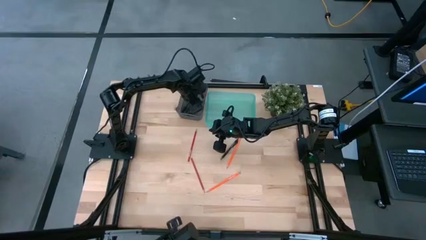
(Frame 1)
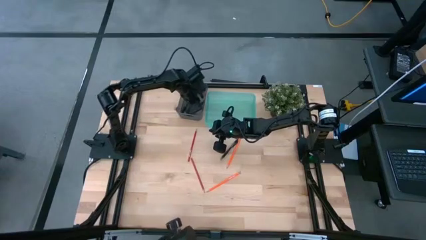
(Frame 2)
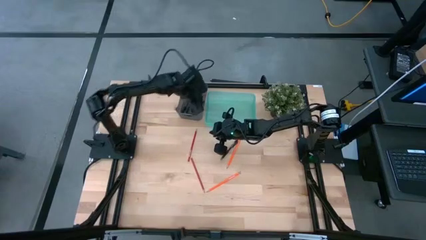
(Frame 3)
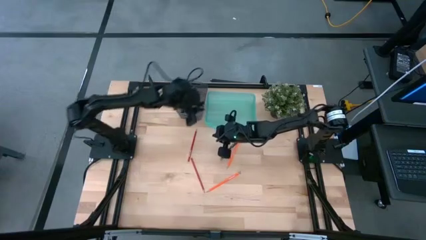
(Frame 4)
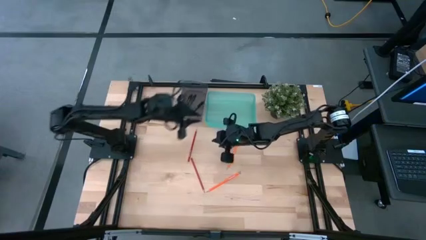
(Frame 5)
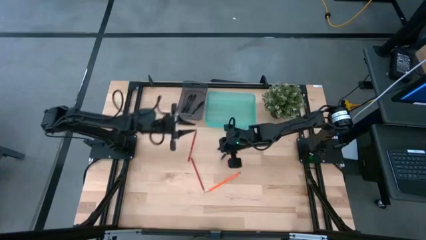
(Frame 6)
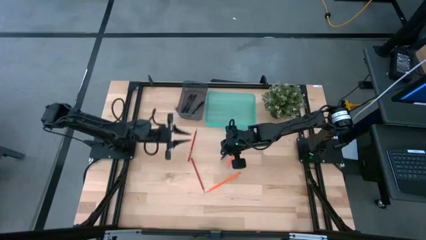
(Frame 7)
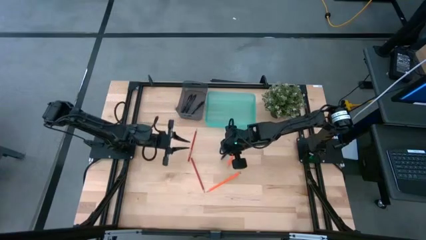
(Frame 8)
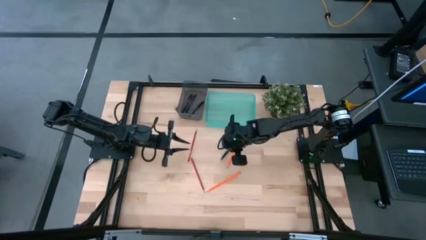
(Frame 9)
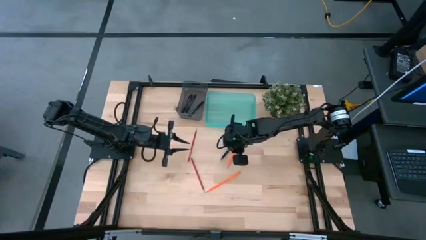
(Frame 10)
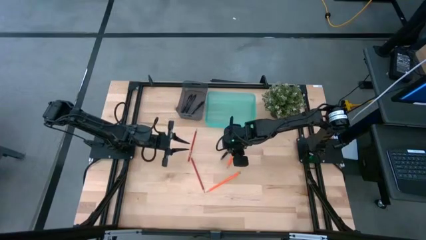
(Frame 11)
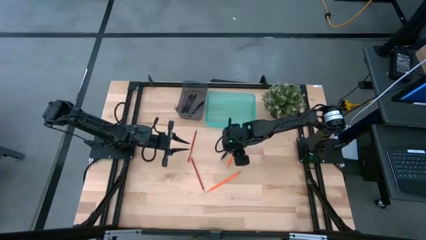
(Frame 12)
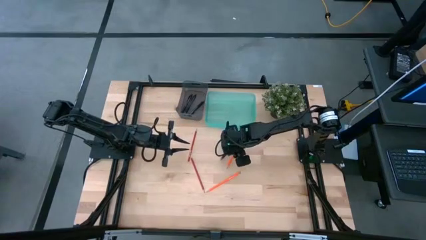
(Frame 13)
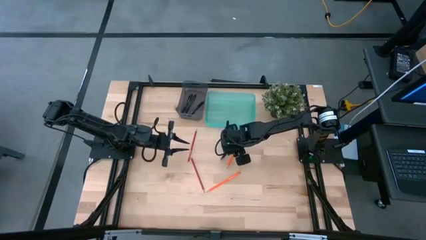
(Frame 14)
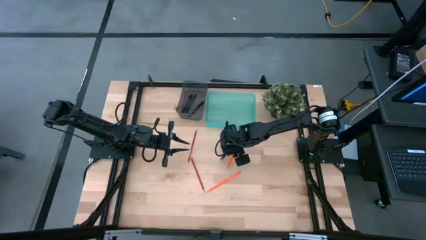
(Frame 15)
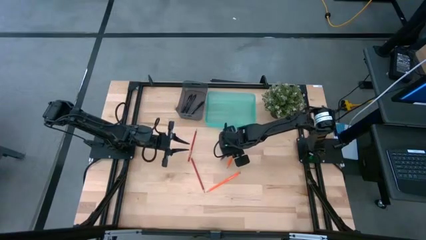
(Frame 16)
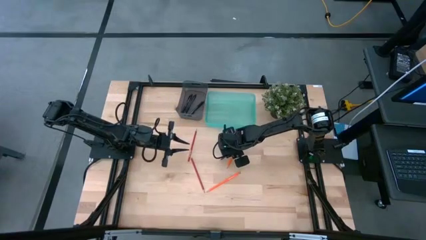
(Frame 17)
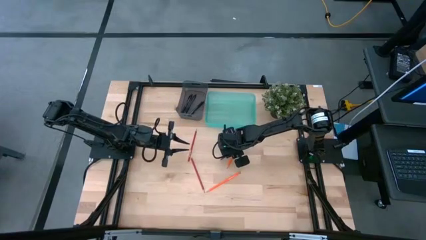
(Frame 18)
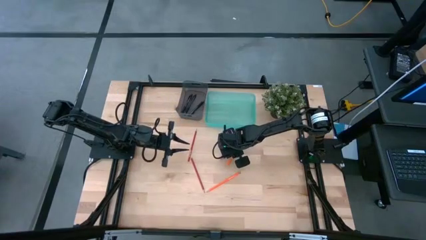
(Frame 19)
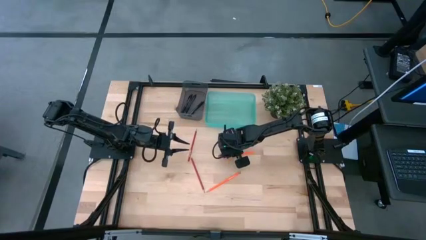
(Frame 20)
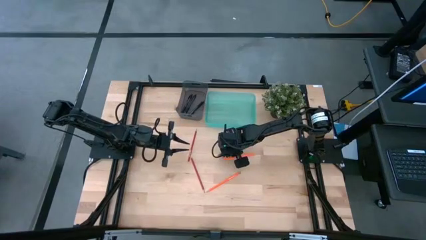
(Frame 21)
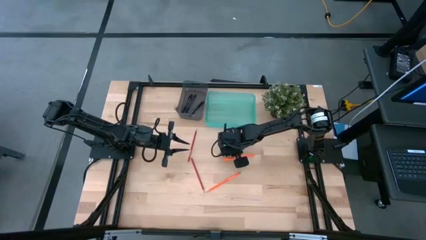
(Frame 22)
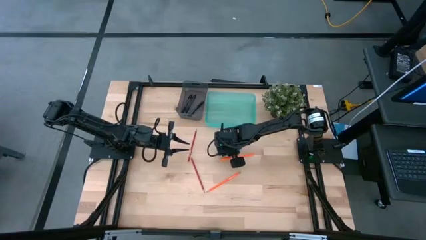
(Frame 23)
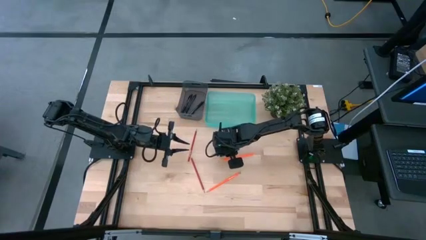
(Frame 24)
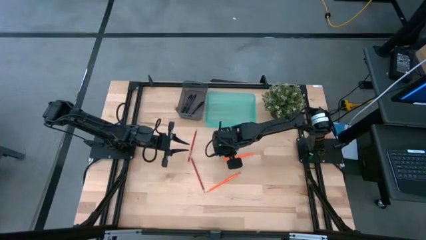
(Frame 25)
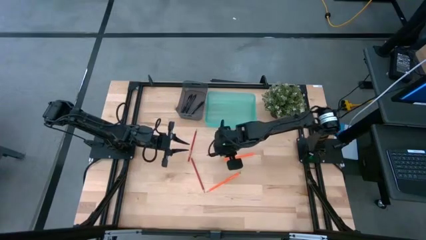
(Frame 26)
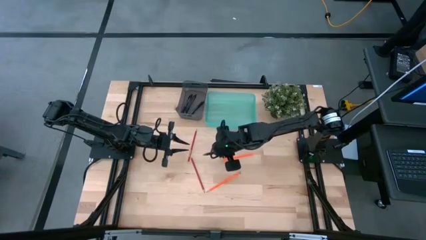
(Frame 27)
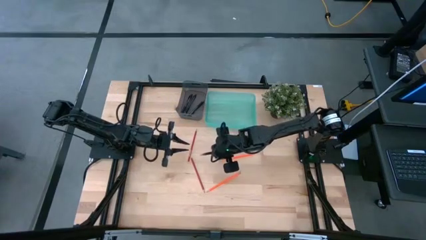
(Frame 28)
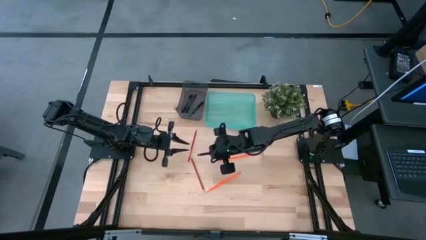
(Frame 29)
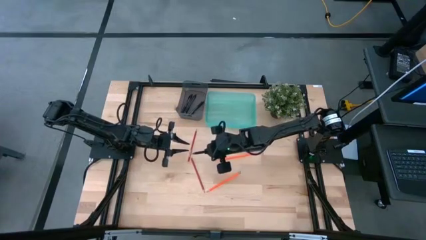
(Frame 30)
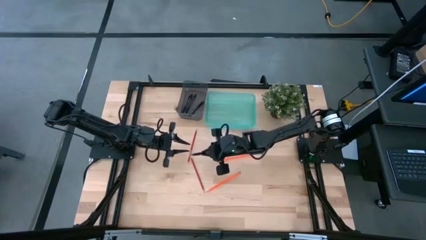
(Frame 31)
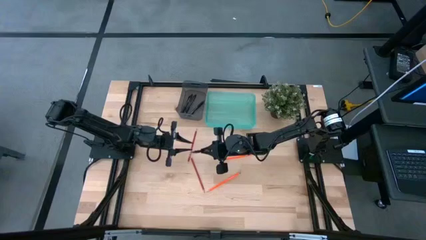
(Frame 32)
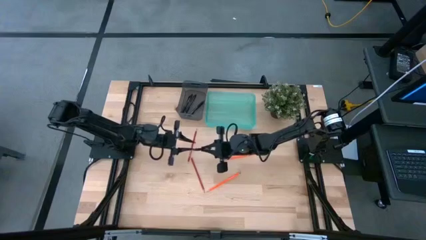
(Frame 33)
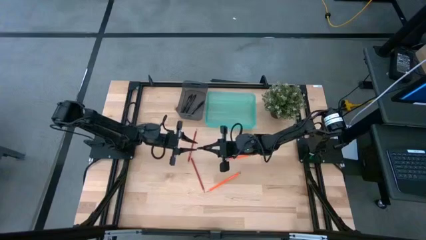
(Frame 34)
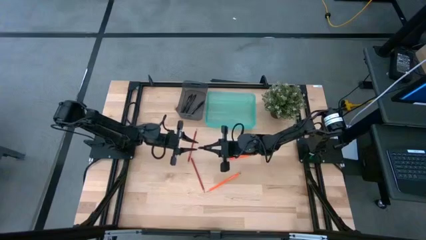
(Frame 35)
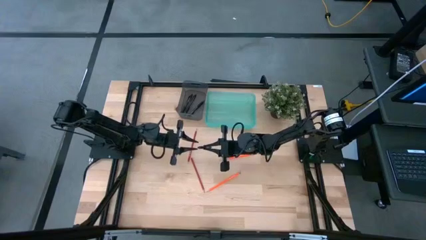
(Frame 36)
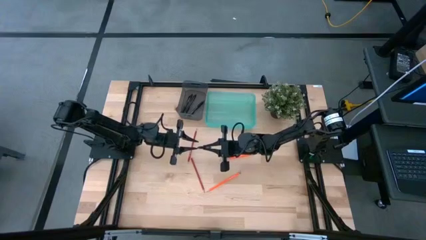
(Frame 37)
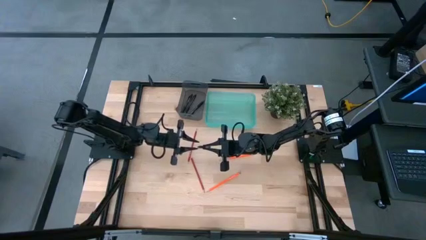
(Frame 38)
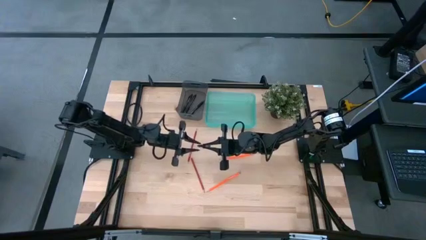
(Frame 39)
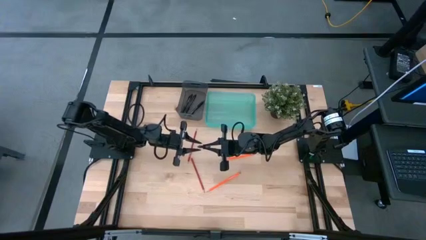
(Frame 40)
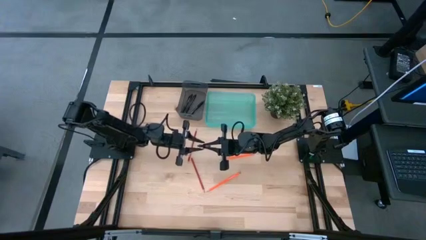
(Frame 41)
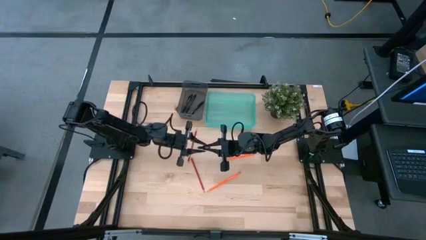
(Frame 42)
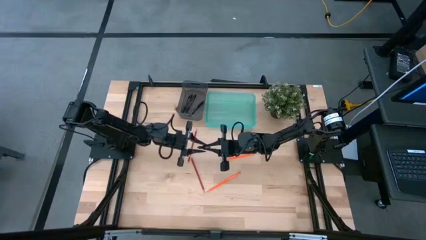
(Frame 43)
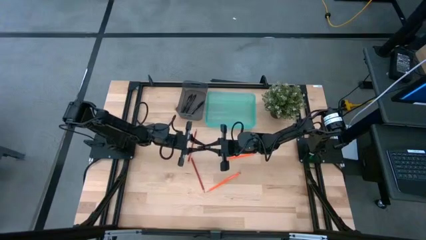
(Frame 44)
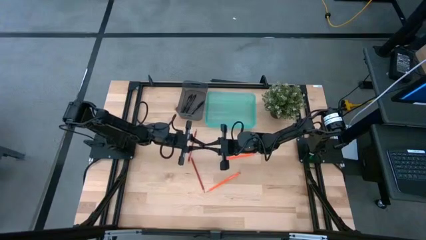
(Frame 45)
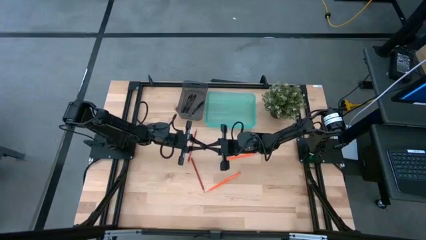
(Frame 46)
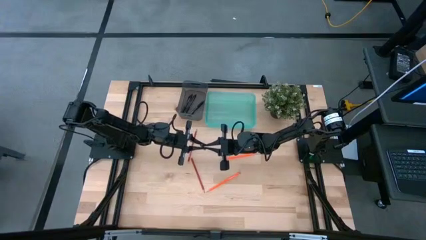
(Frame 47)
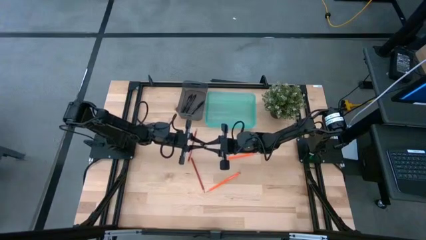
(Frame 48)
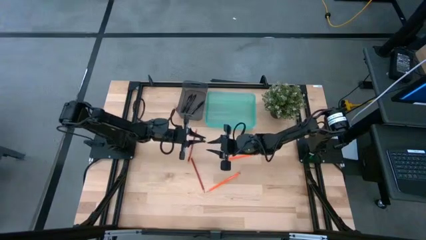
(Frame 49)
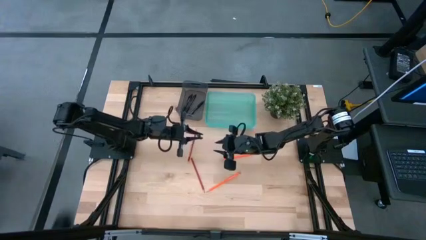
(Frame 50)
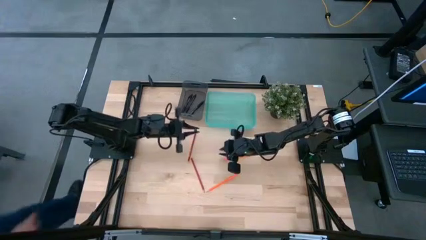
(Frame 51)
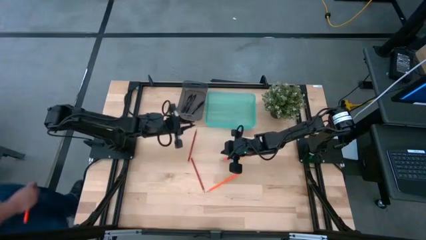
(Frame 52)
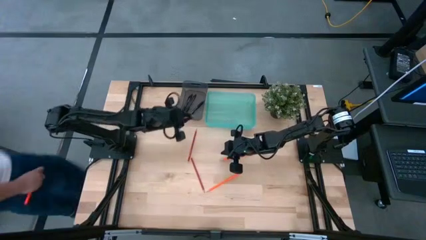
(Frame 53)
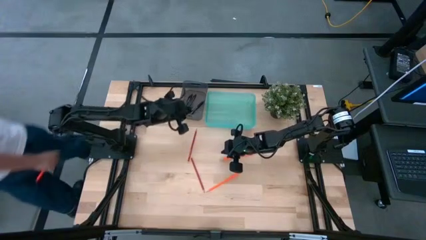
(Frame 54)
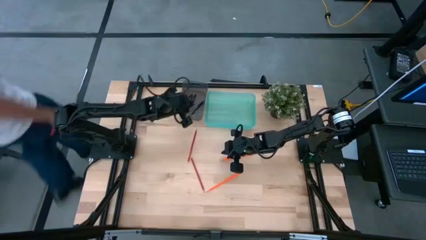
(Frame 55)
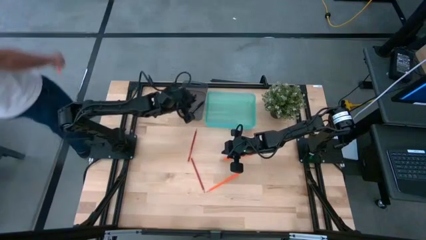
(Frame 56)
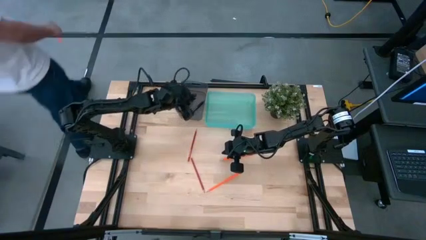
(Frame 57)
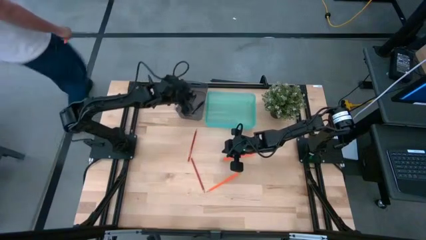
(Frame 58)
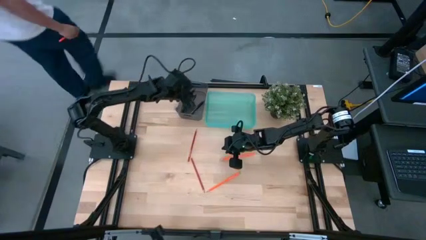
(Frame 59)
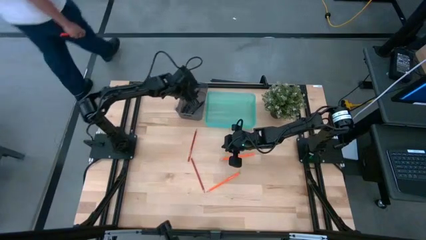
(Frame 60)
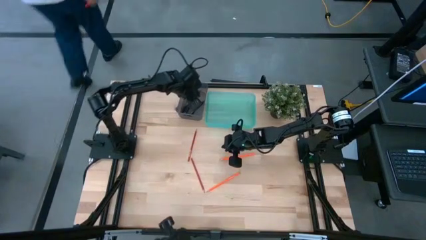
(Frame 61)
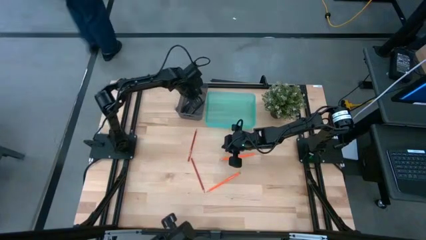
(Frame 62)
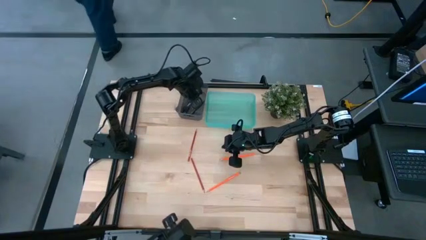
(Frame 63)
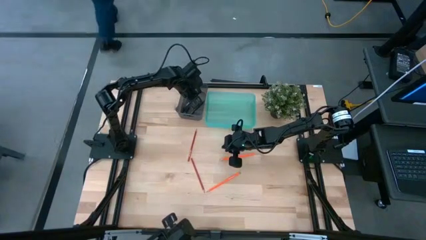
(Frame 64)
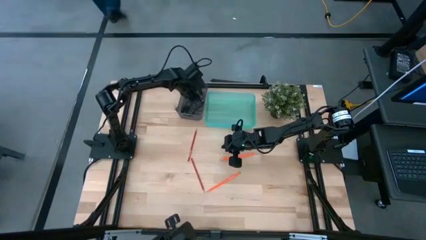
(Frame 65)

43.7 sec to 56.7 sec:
Task: Sort pens & pencils
Put the black pen into the black bin

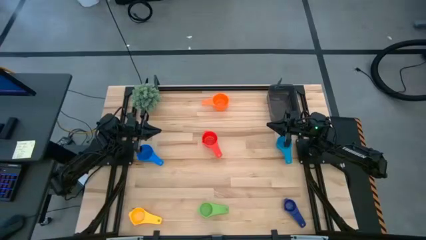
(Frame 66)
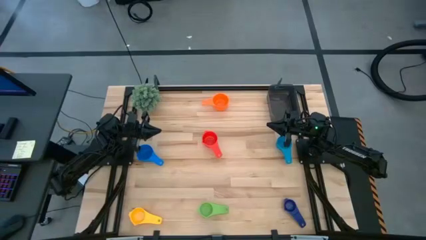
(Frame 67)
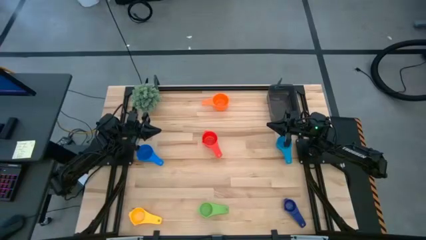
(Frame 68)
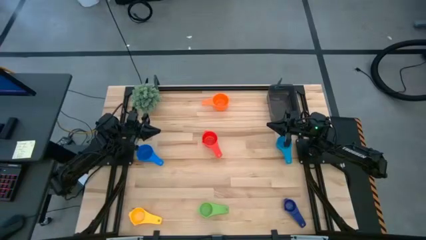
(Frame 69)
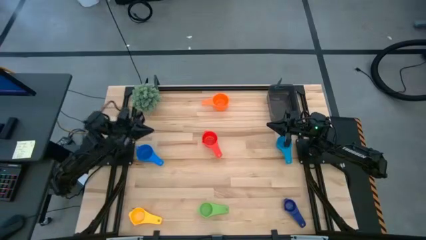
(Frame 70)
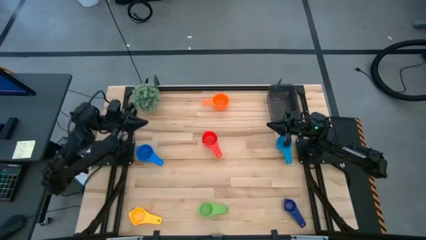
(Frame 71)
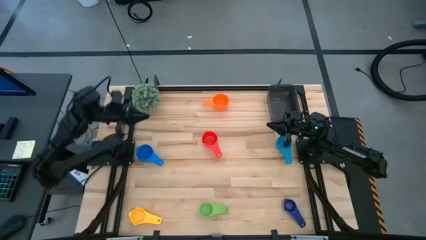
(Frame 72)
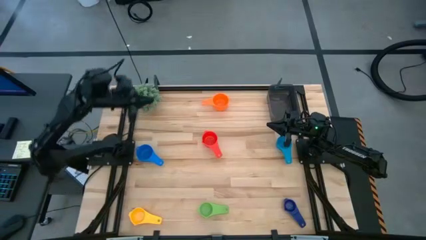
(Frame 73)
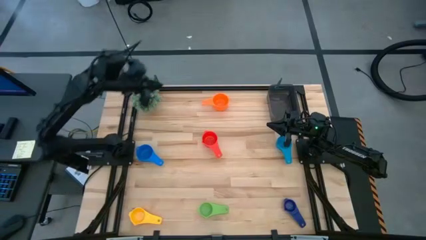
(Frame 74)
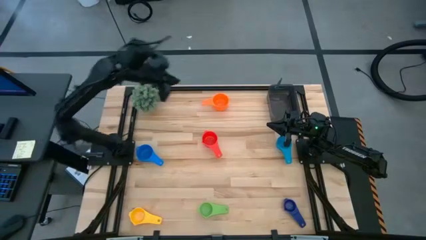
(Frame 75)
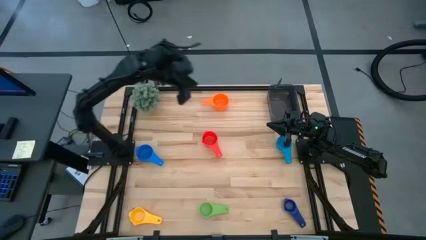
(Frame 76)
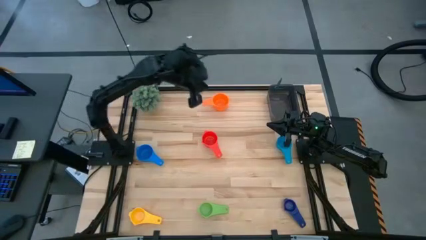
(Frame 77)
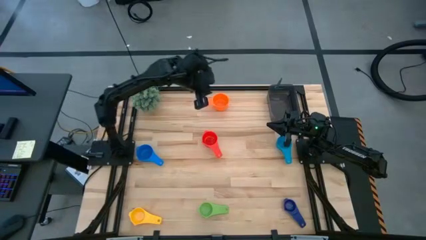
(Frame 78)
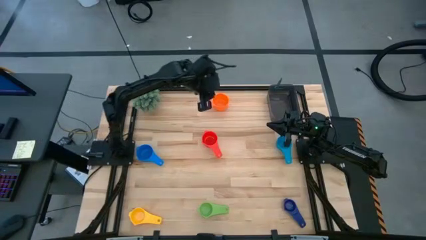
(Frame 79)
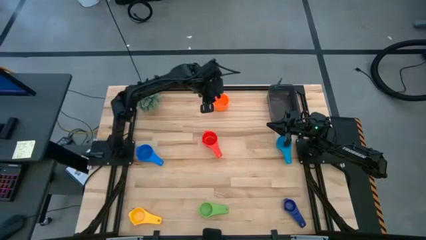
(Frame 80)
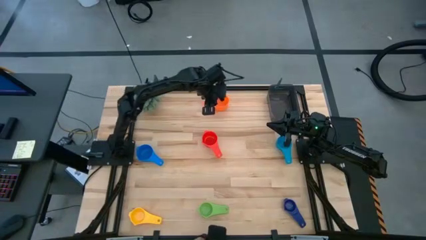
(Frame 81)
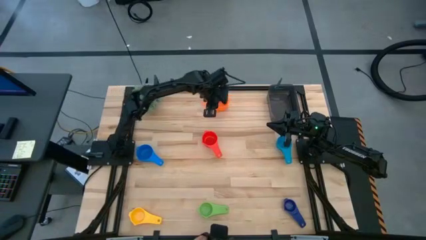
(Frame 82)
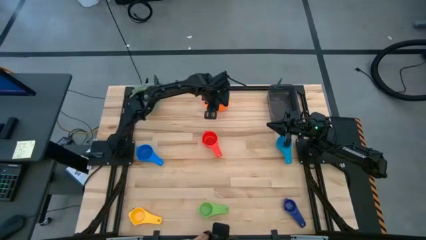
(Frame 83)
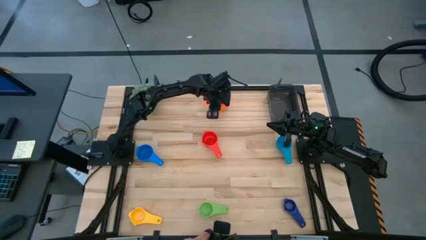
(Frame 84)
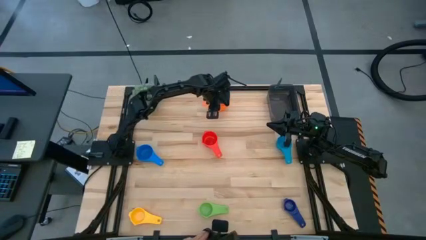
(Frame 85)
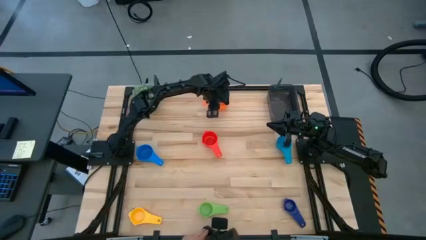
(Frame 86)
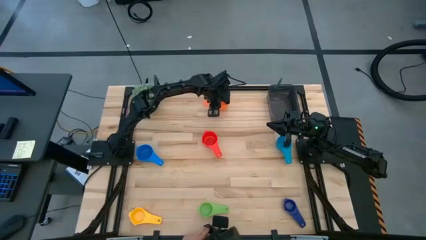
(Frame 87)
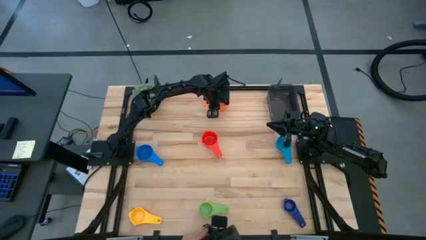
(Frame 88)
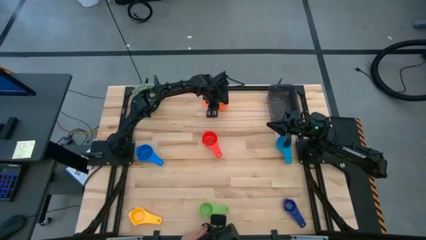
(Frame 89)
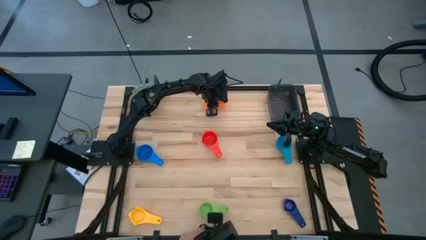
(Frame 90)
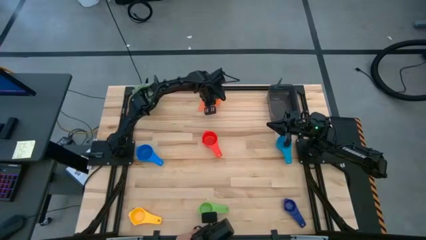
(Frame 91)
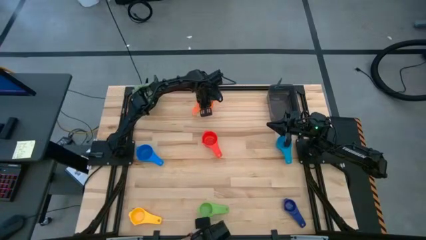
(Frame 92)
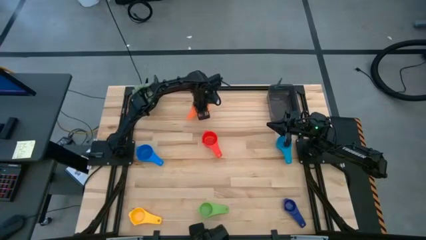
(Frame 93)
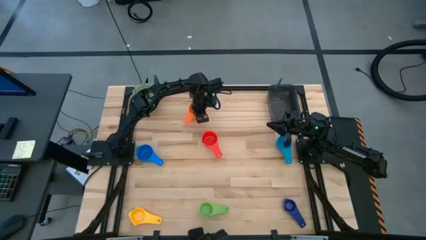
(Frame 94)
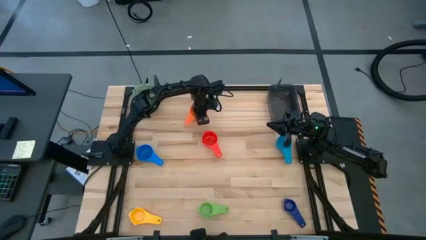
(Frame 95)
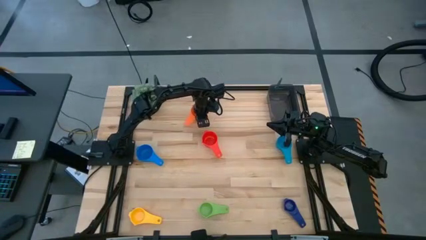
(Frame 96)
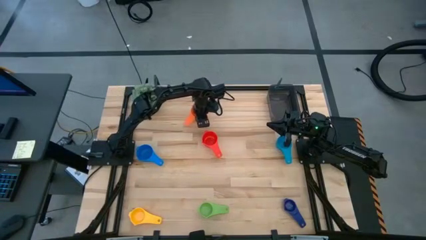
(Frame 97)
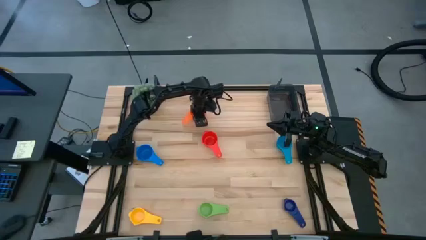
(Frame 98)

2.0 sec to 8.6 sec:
Task: Nest measuring cups in basket
Adjust the orange measuring cup
